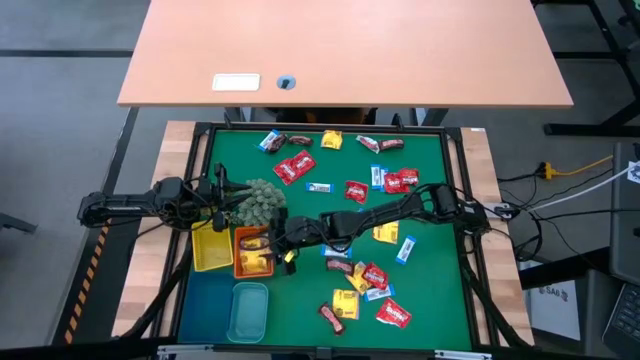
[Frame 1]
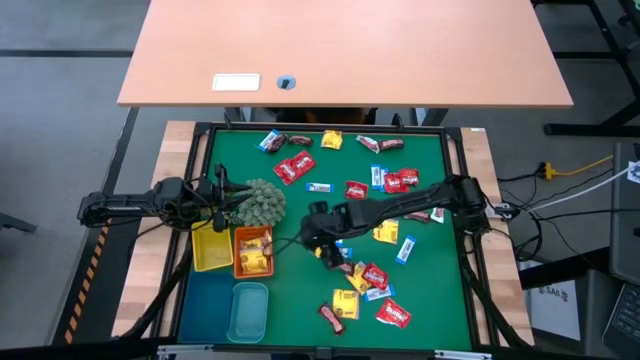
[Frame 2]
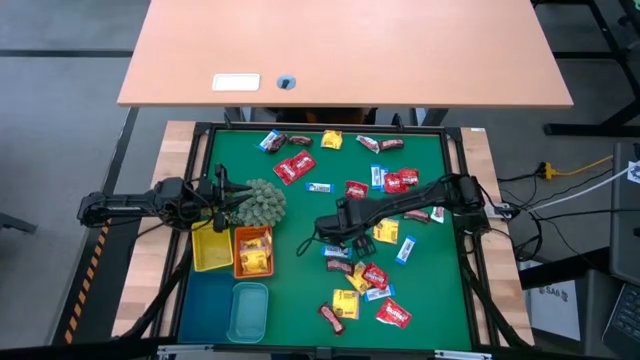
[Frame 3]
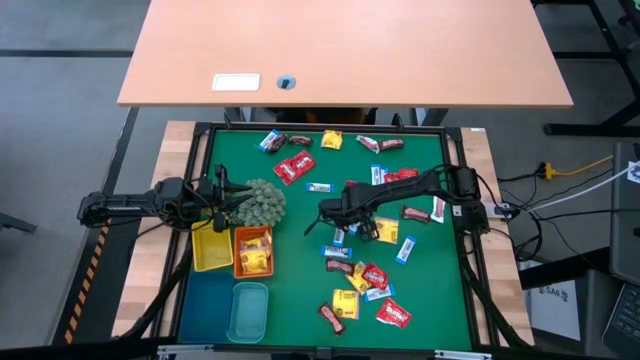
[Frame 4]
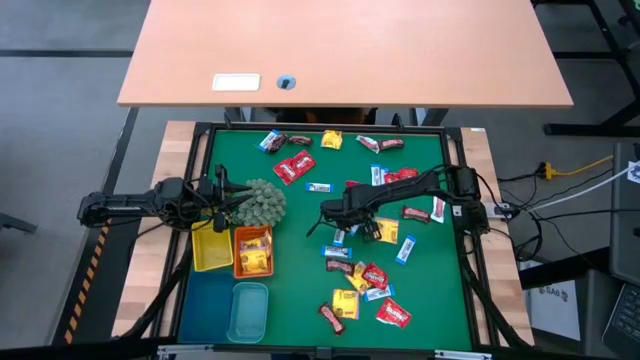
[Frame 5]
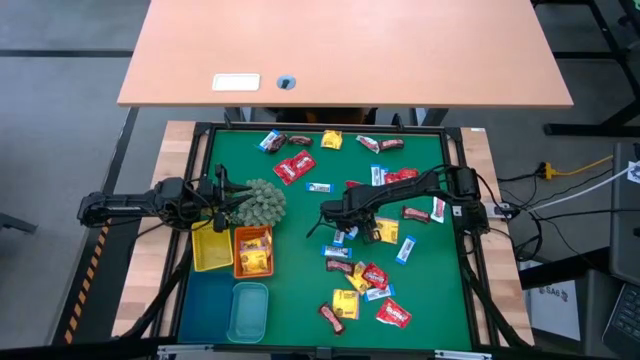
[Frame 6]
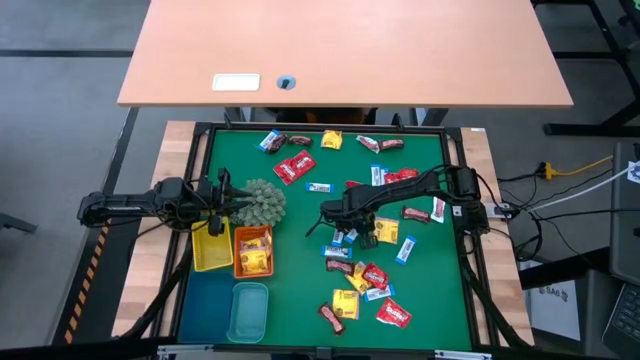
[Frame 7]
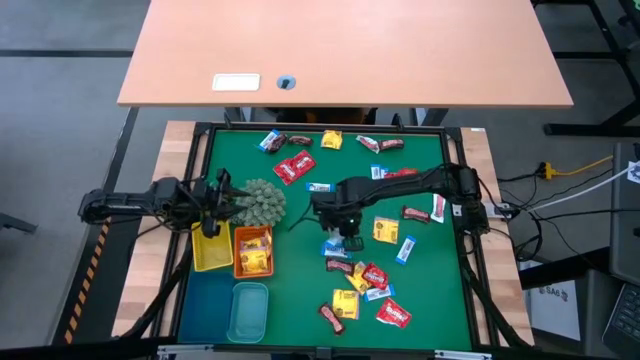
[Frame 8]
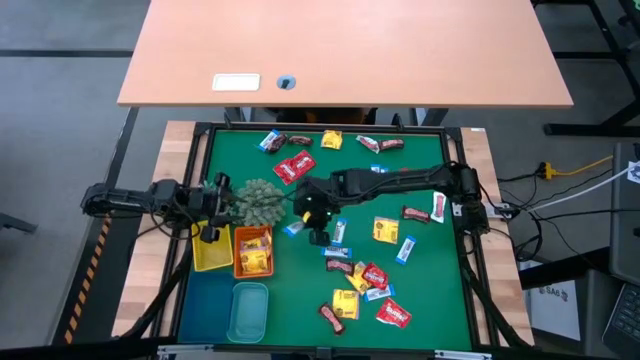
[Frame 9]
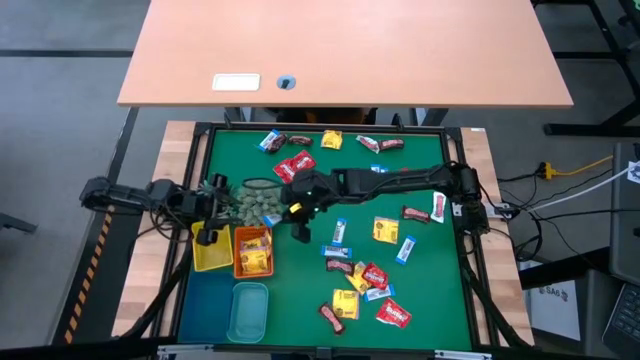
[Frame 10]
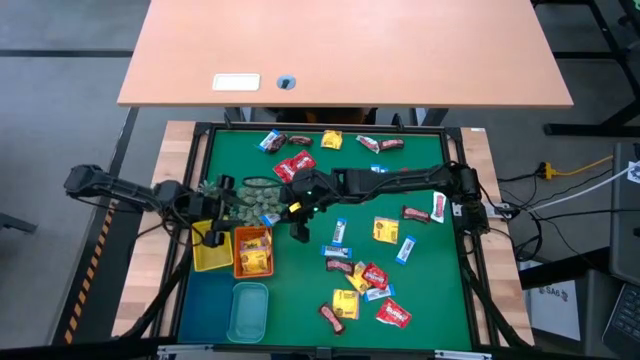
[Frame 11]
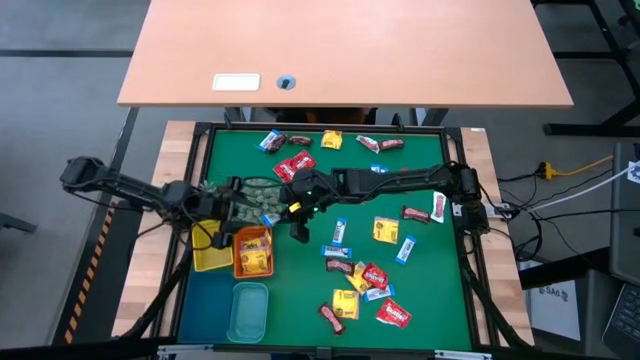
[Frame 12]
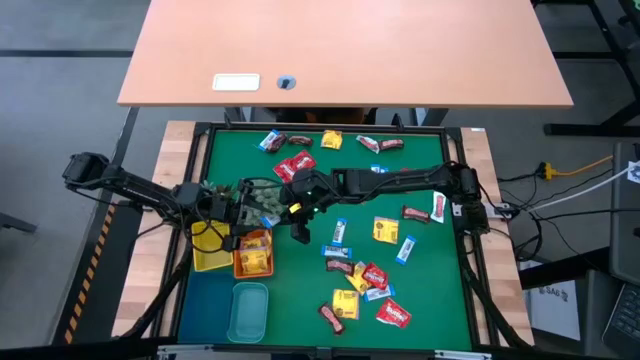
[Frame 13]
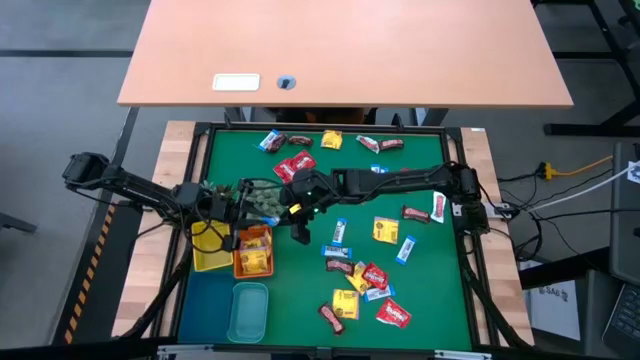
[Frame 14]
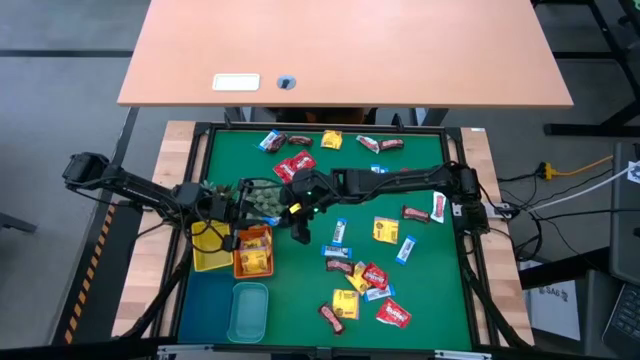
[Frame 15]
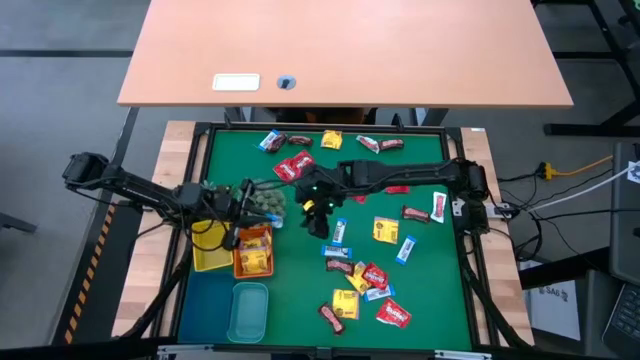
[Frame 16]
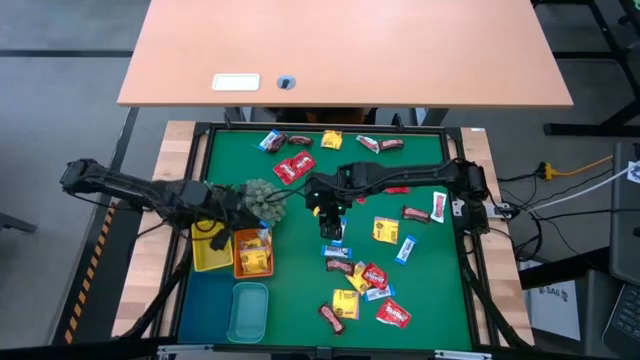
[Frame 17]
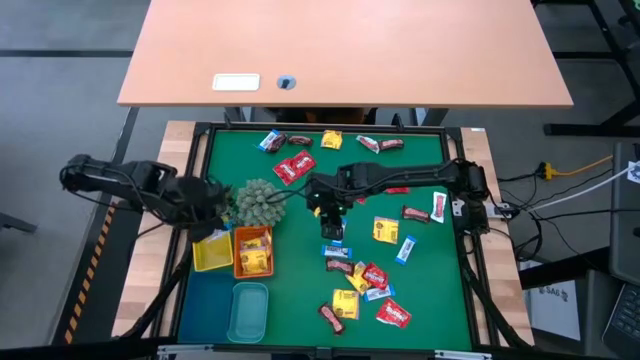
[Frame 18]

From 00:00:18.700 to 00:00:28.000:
Task: Sort candy
Put the white chocolate into the yellow basket

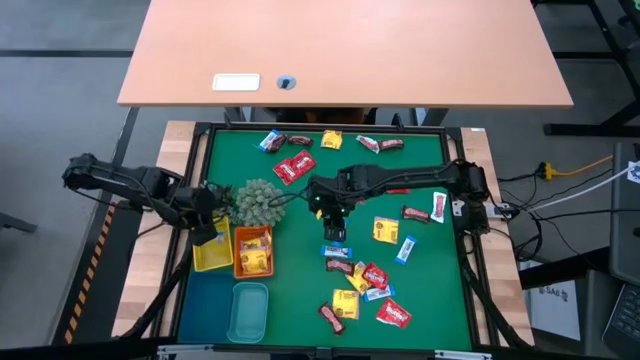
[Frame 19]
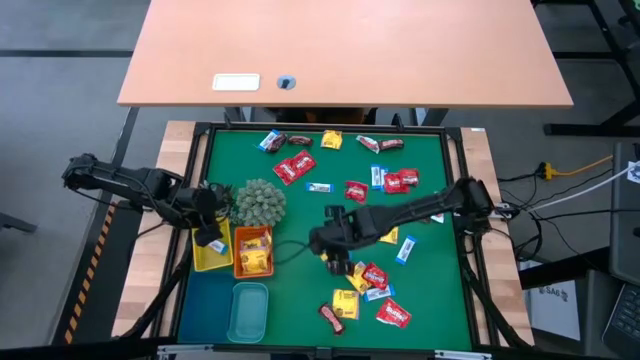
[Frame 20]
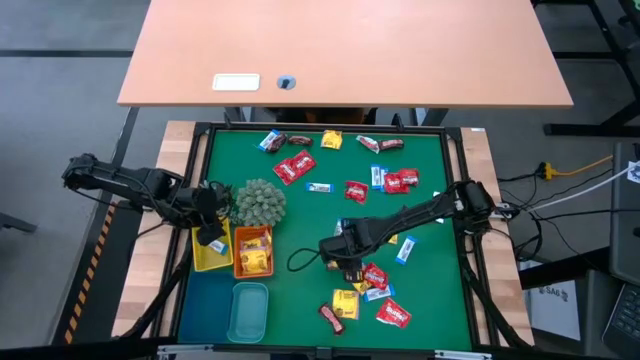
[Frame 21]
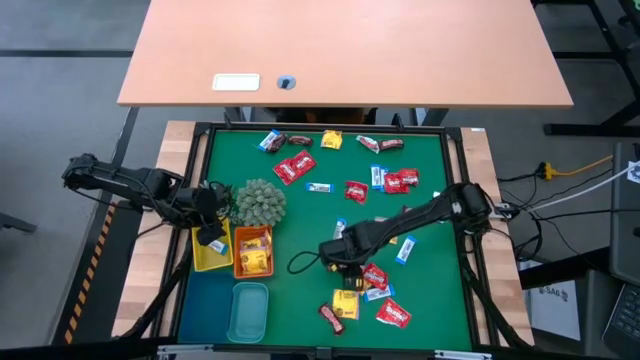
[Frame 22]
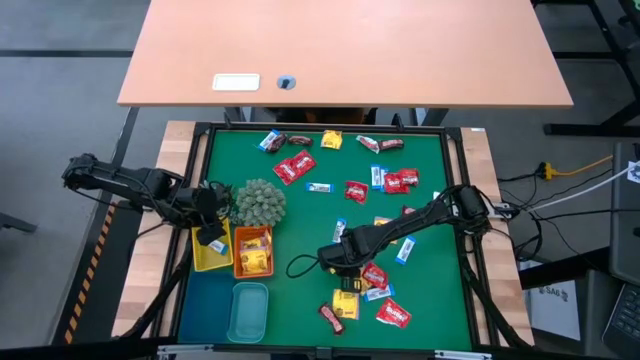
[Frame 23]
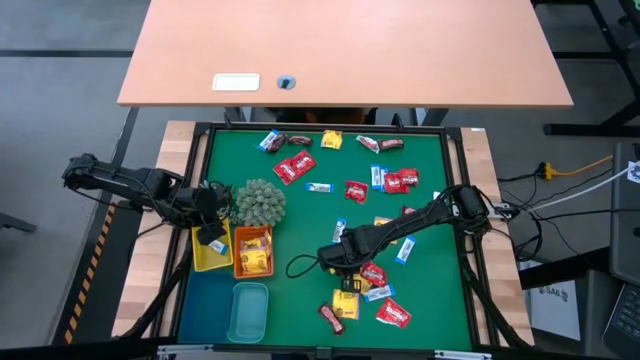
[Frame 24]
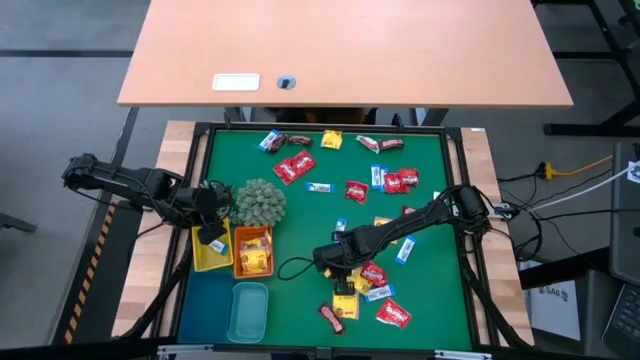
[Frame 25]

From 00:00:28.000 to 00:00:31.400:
Put the brown chocolate into the green bin

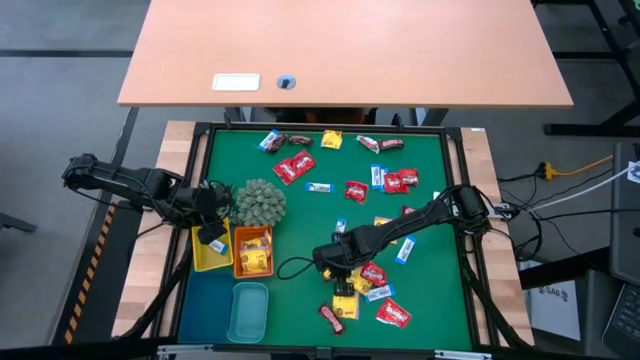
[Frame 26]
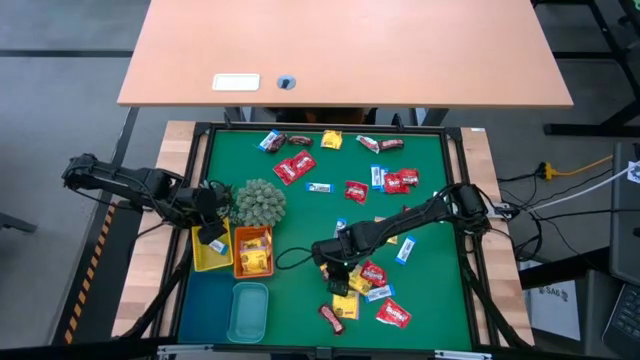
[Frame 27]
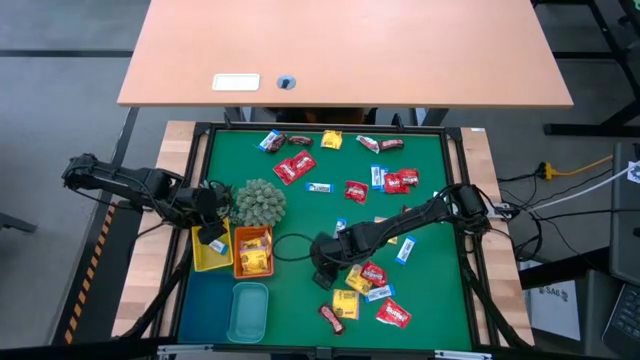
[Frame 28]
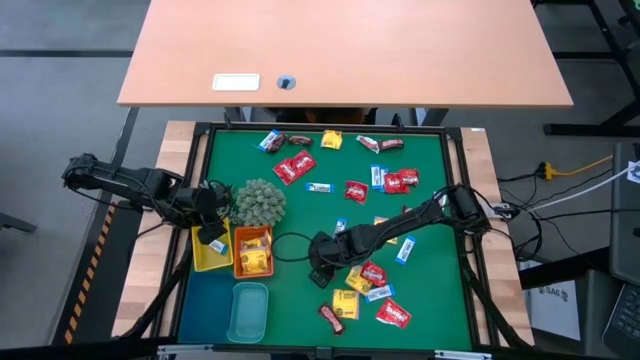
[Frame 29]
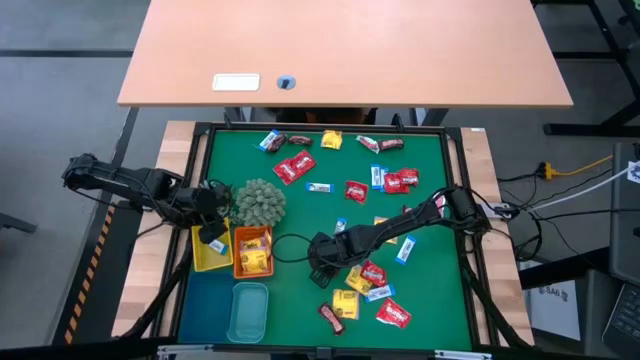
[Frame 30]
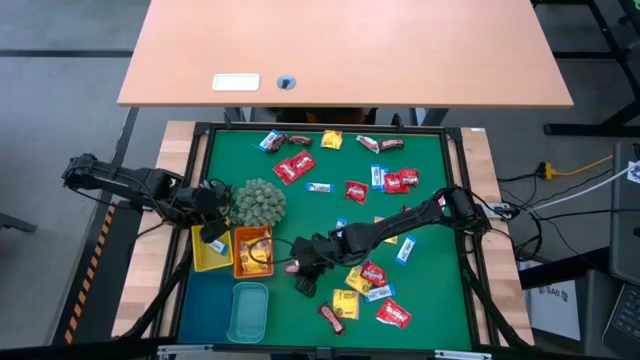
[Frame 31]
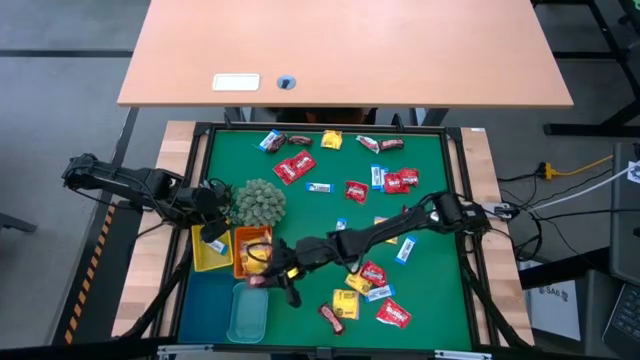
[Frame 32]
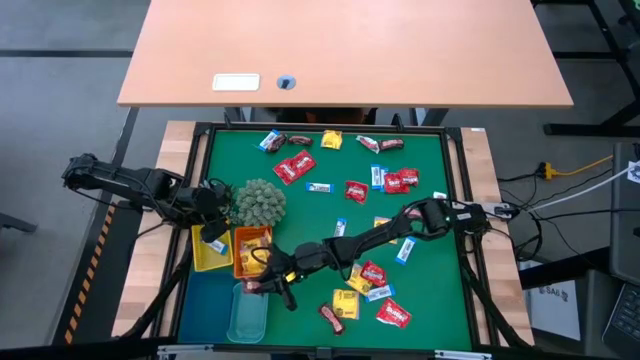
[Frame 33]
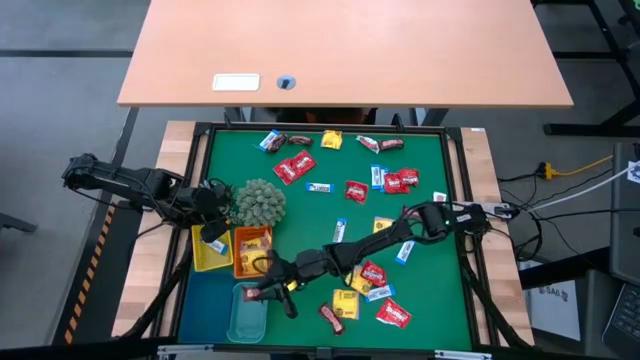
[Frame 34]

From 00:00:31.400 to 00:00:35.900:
Put the brown chocolate into the green bin

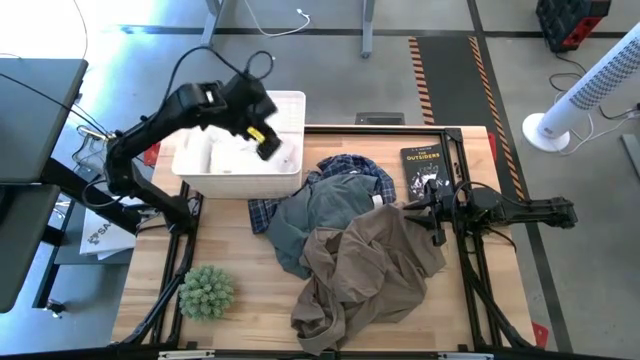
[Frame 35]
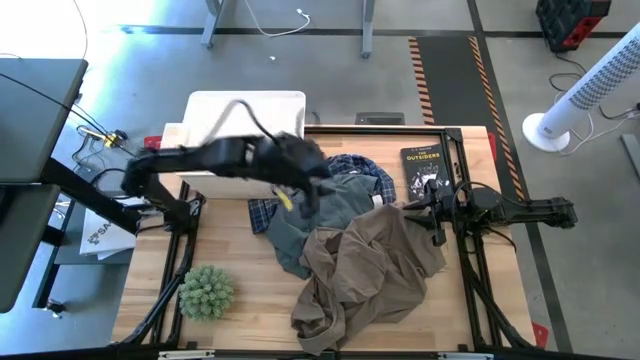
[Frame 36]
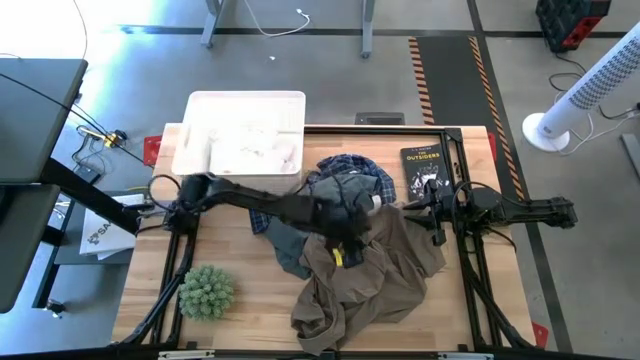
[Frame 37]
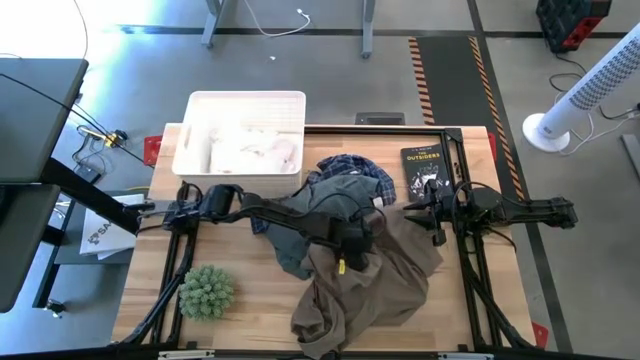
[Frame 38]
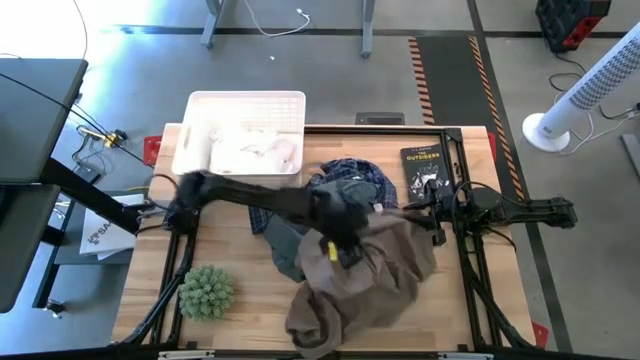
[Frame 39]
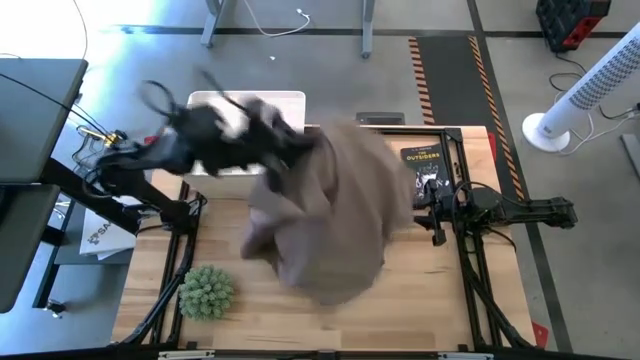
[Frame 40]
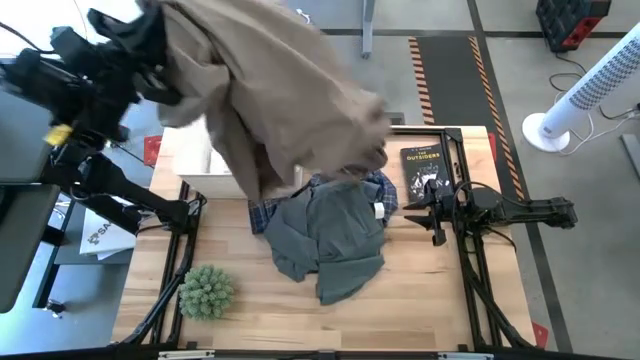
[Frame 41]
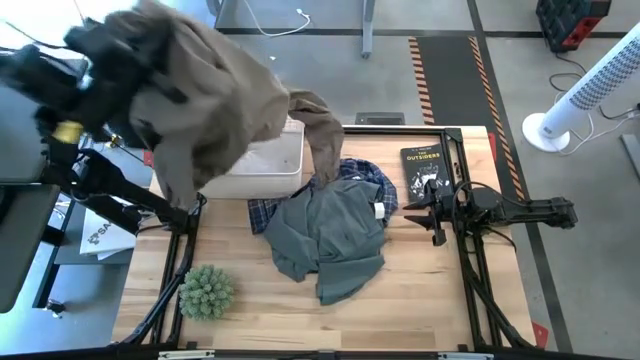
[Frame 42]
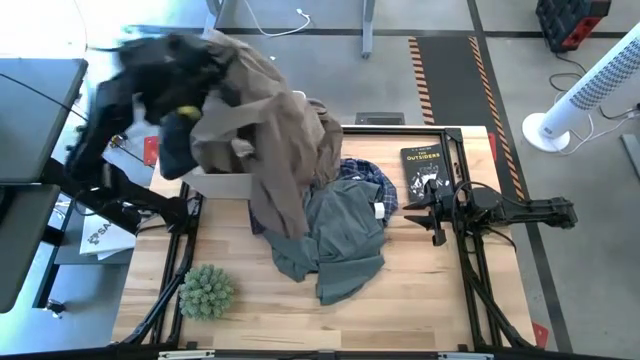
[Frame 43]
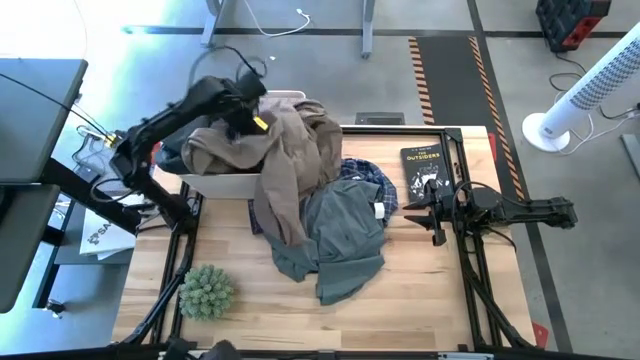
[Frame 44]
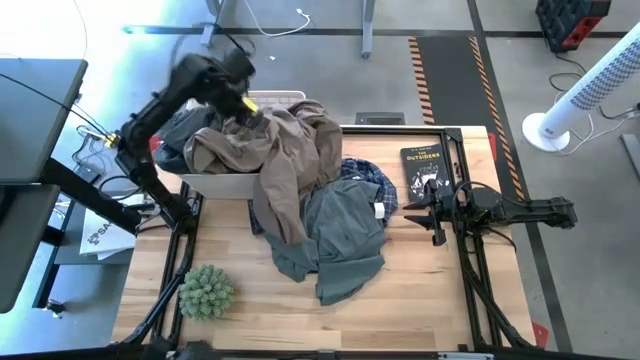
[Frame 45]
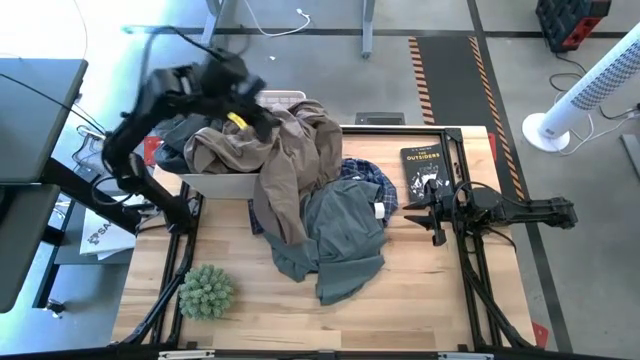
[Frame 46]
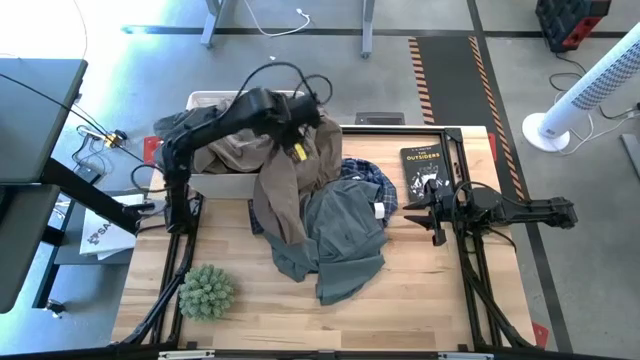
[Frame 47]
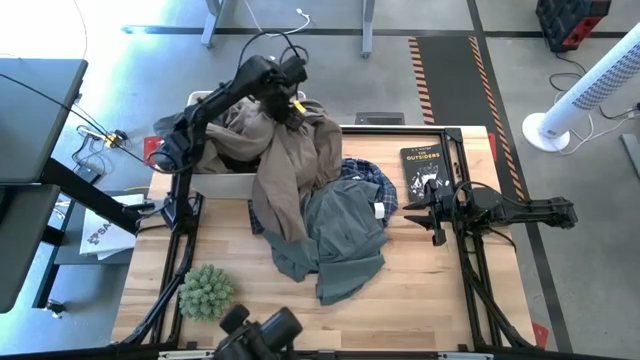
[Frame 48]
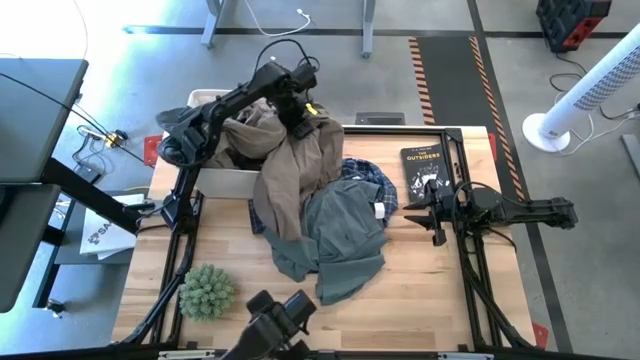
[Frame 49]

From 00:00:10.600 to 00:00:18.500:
Task: Sort clothes
Put the brown jacket into the white laundry bin
